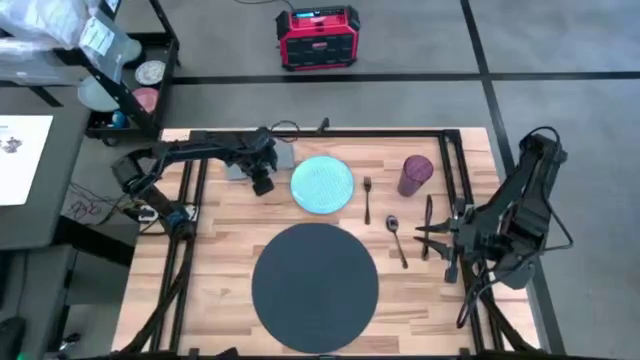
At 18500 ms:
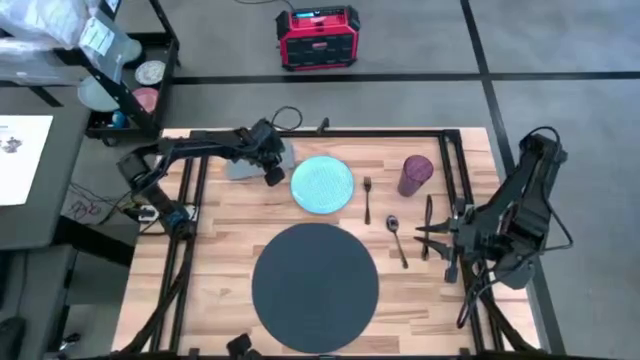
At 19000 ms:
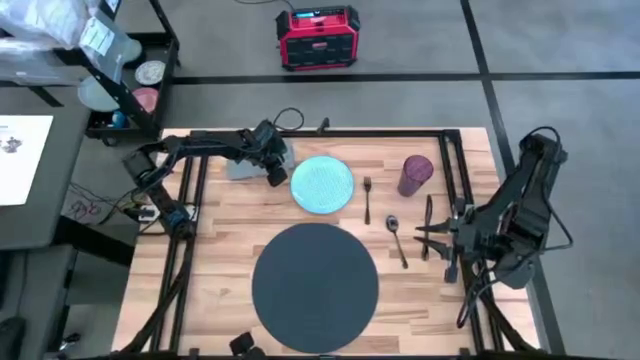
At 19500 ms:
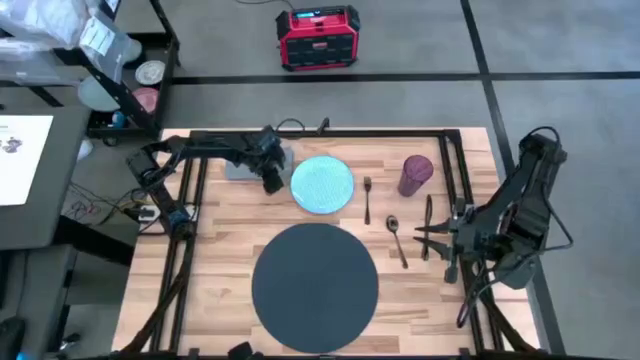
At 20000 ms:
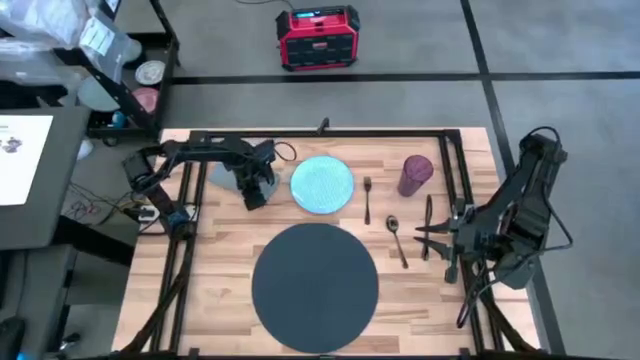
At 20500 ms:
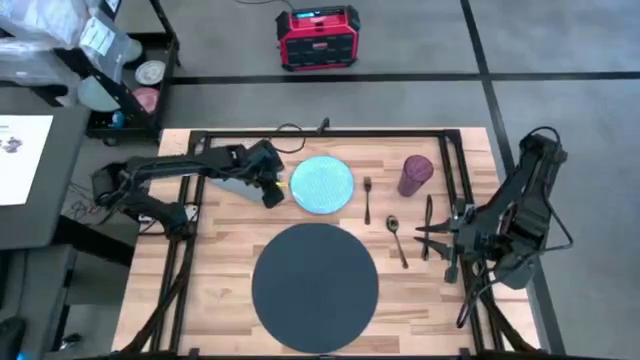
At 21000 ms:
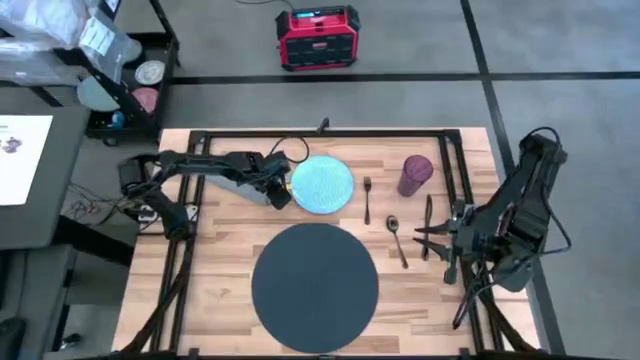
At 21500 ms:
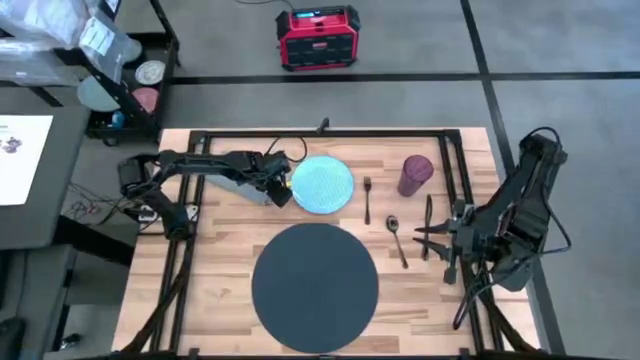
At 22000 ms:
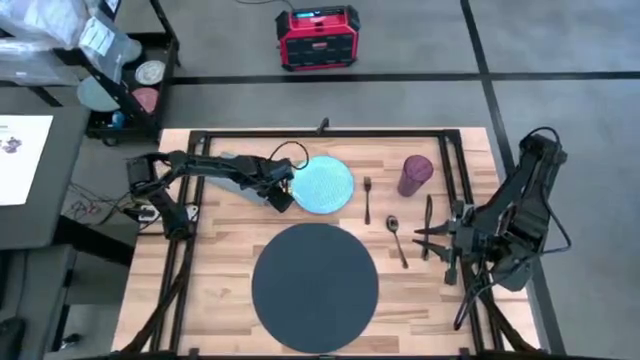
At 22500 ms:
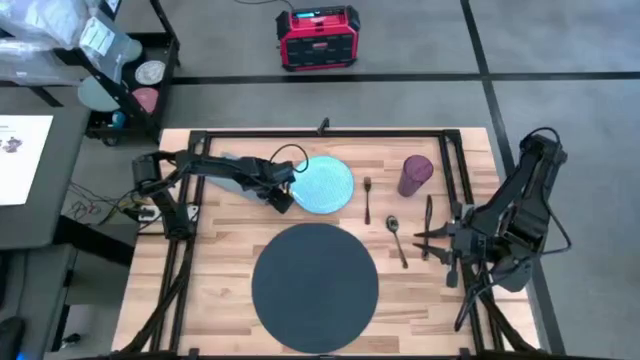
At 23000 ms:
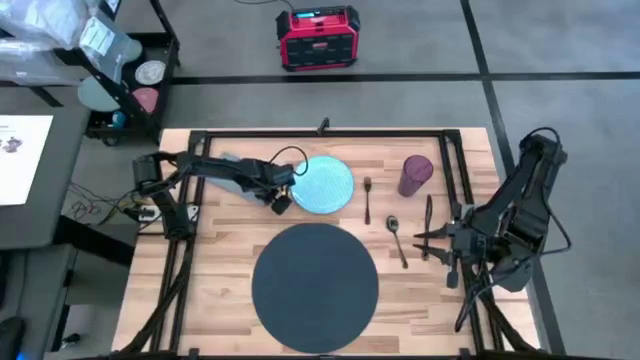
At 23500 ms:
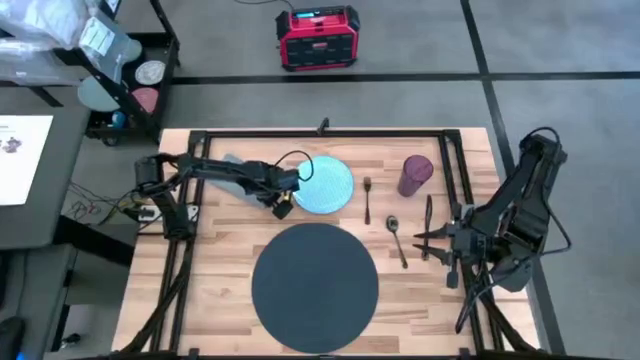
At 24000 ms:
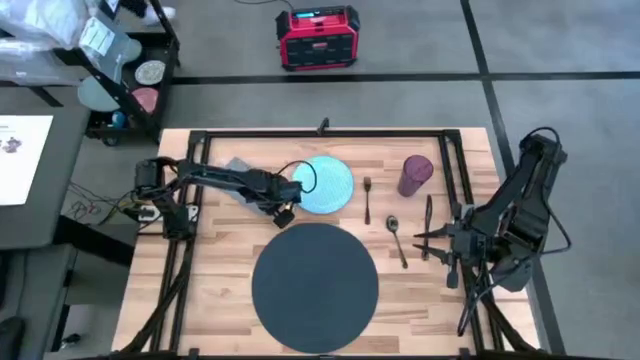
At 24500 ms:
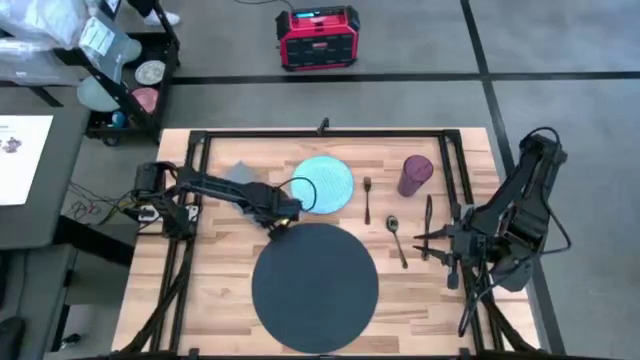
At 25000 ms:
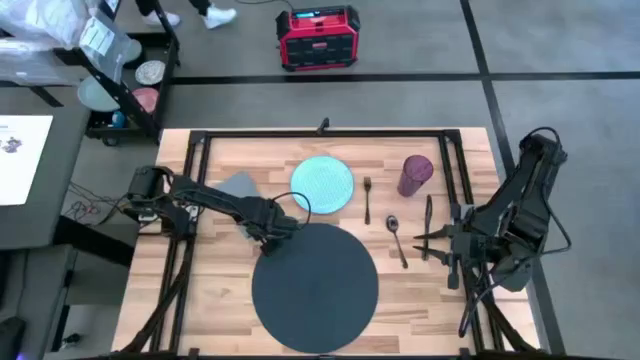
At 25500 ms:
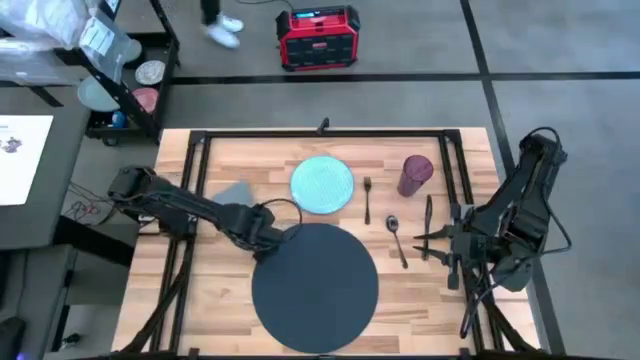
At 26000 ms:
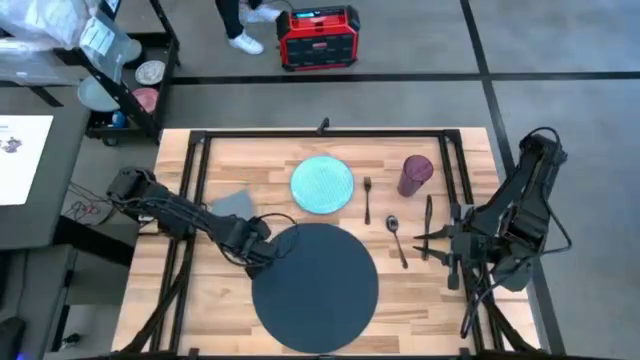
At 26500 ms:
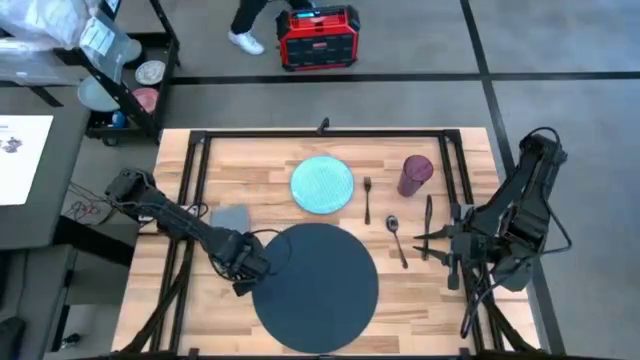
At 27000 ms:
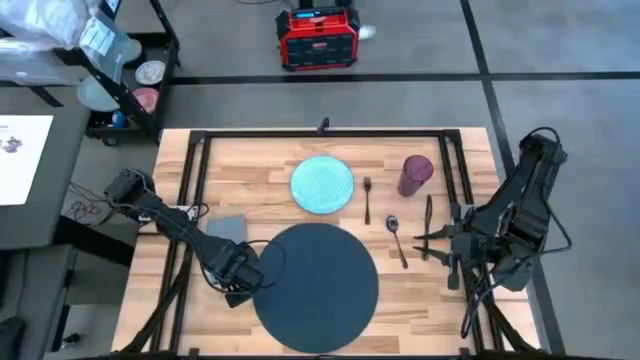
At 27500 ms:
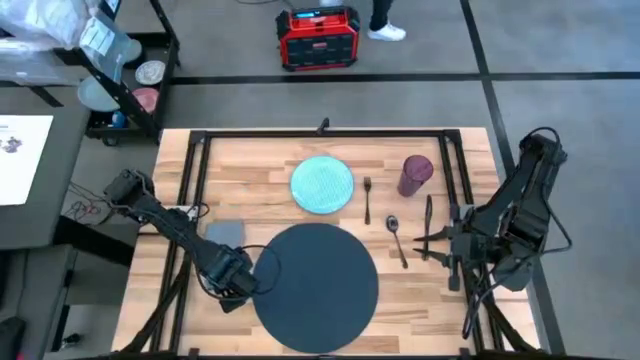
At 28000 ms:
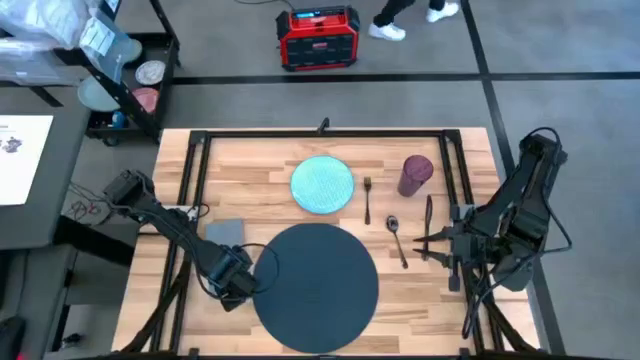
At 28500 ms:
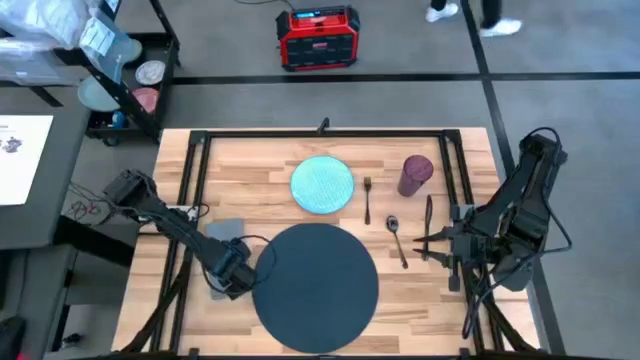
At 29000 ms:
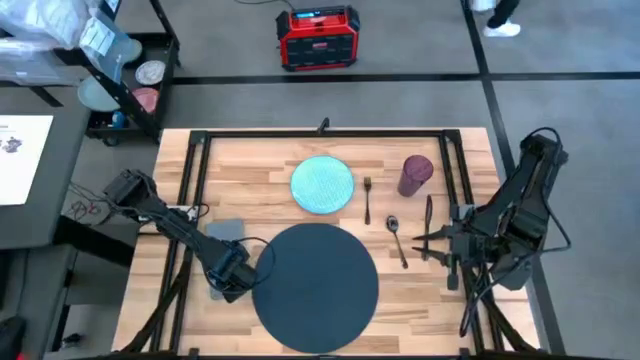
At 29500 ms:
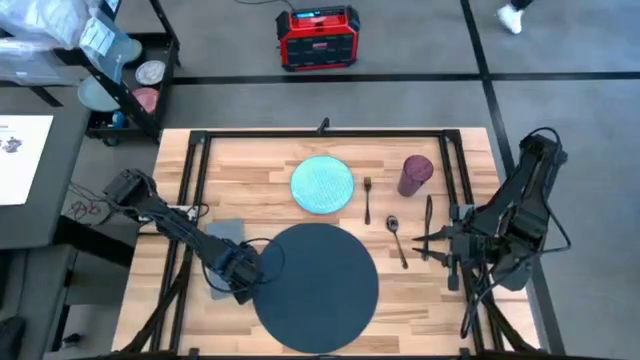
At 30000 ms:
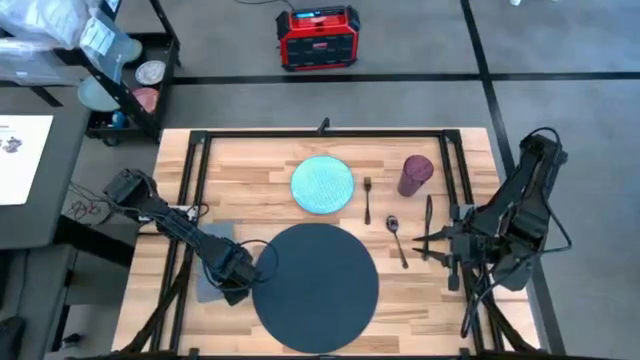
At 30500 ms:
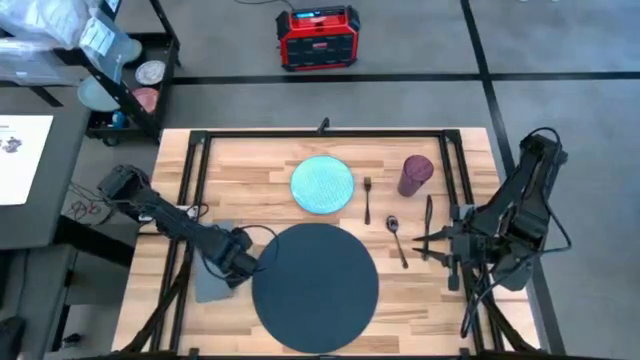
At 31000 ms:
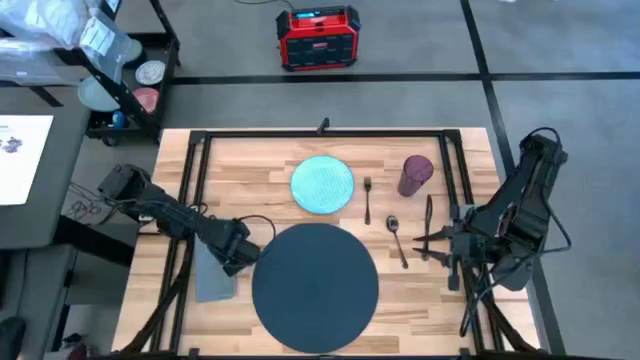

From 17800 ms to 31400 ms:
Task: Set table place
Move the gray table napkin to the left of the black tablemat

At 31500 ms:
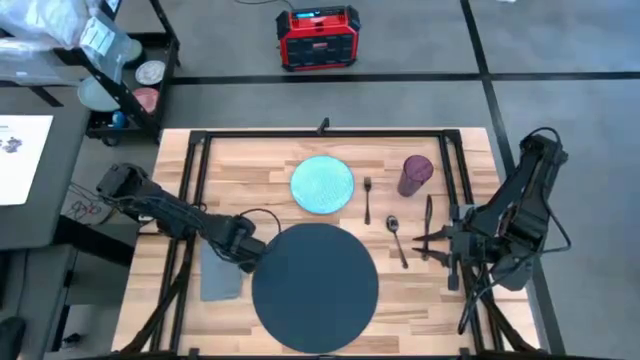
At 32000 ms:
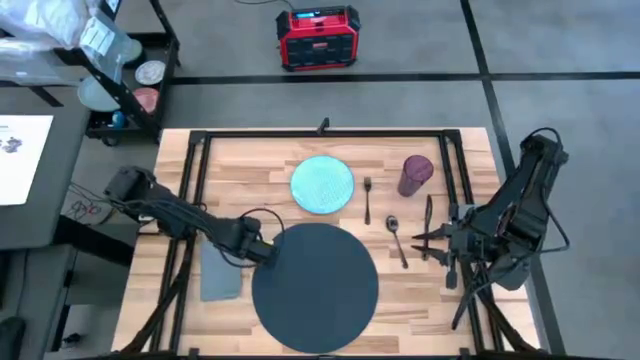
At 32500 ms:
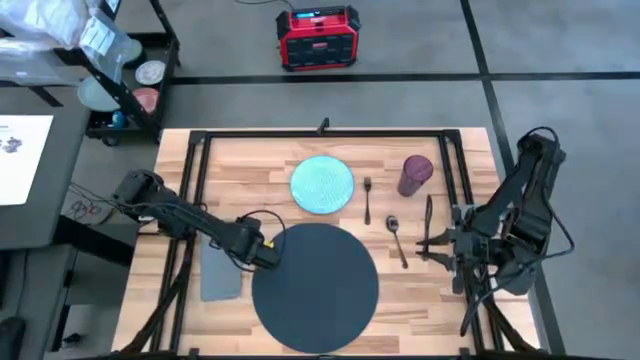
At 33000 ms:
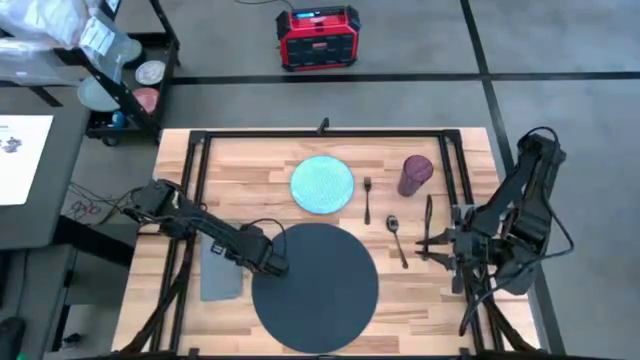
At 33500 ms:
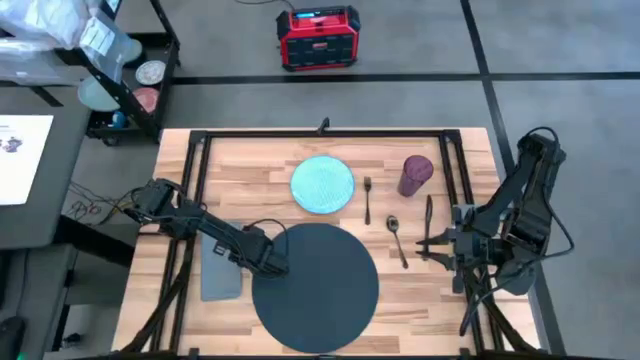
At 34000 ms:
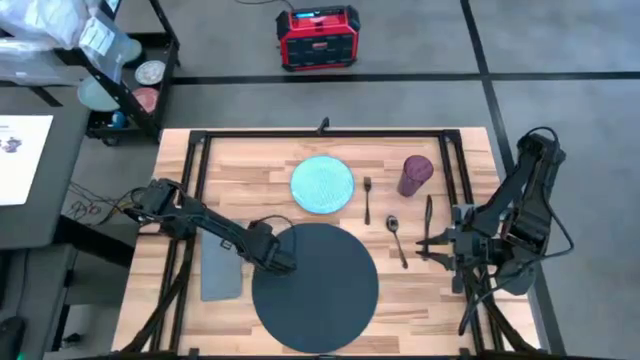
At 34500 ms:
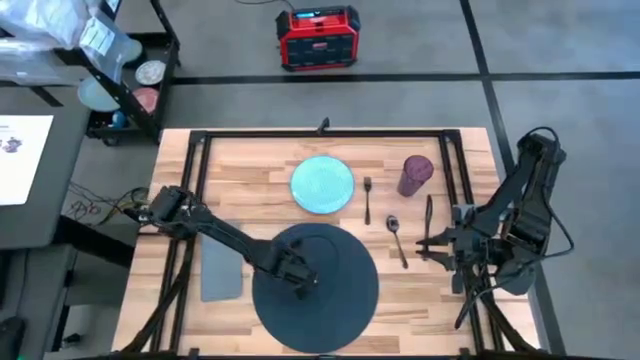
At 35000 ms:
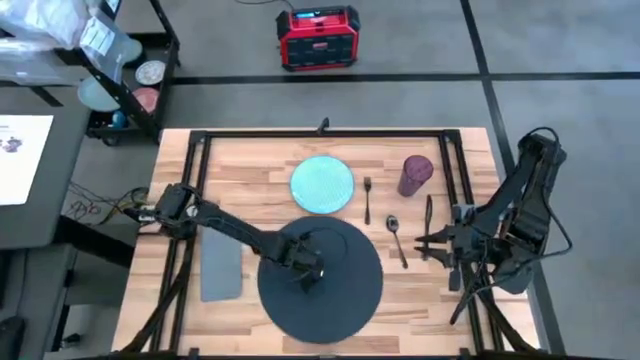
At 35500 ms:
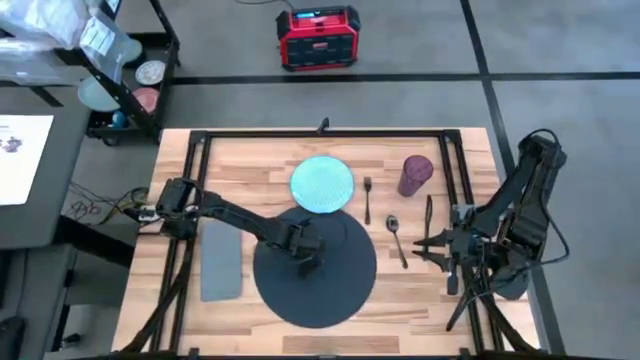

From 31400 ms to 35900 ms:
Adjust the black tablemat

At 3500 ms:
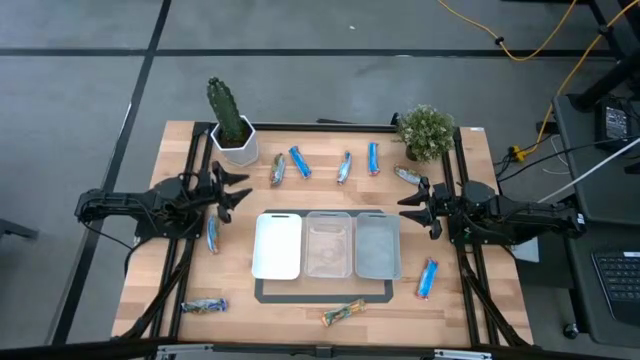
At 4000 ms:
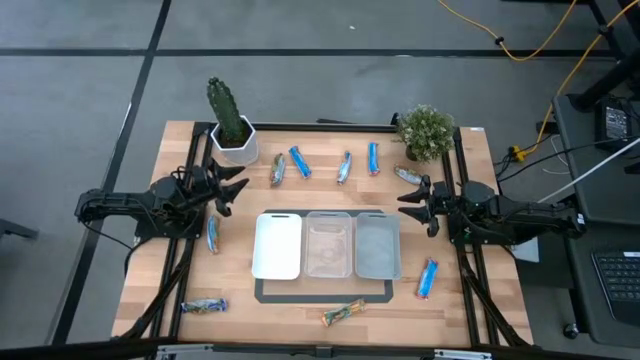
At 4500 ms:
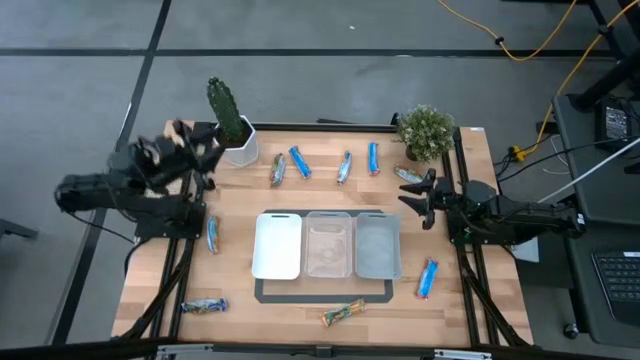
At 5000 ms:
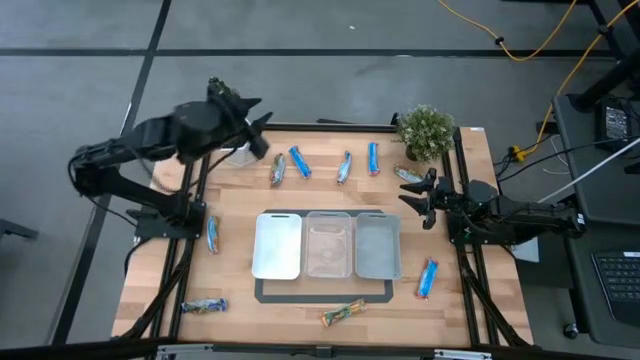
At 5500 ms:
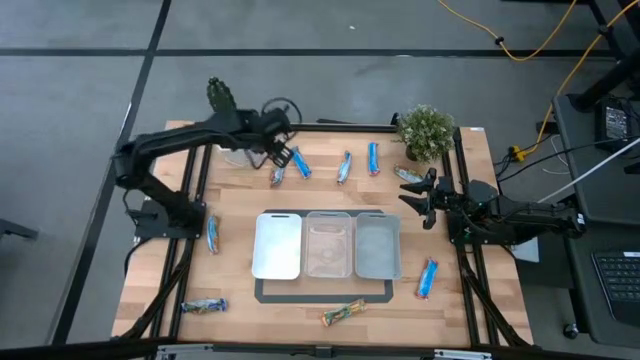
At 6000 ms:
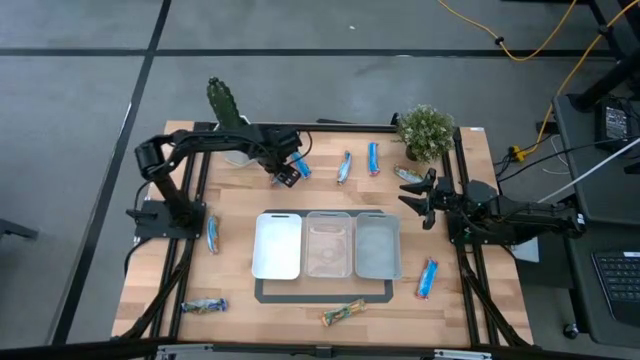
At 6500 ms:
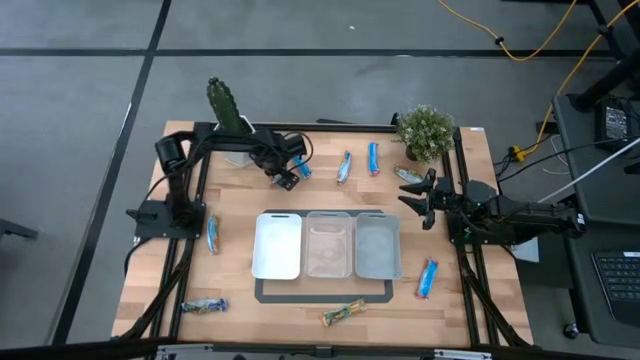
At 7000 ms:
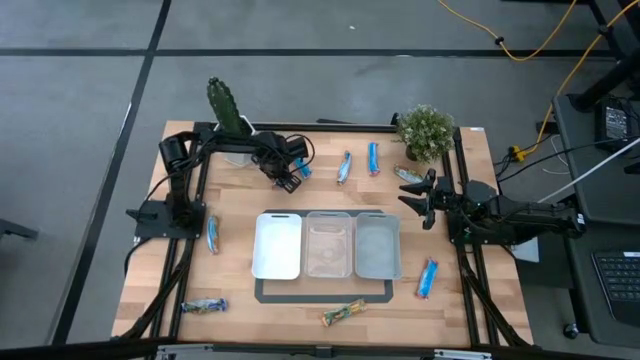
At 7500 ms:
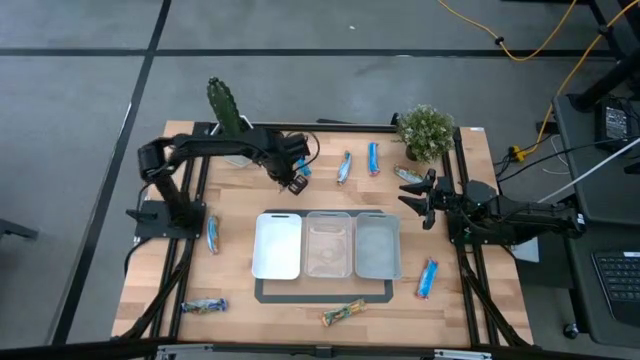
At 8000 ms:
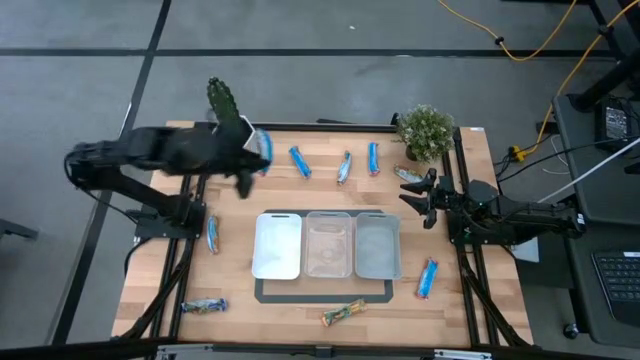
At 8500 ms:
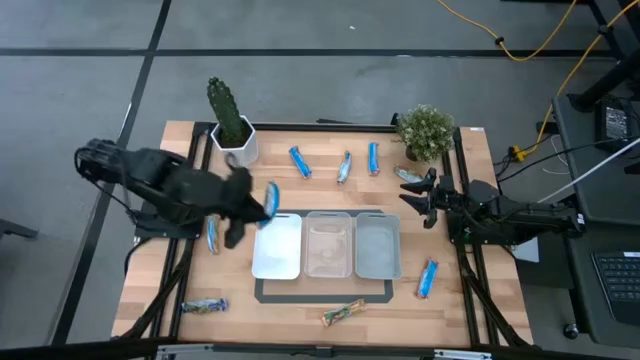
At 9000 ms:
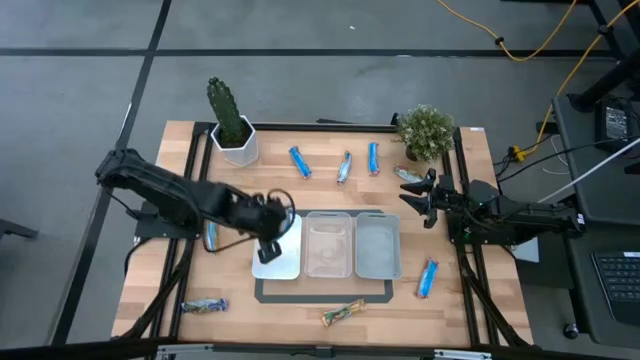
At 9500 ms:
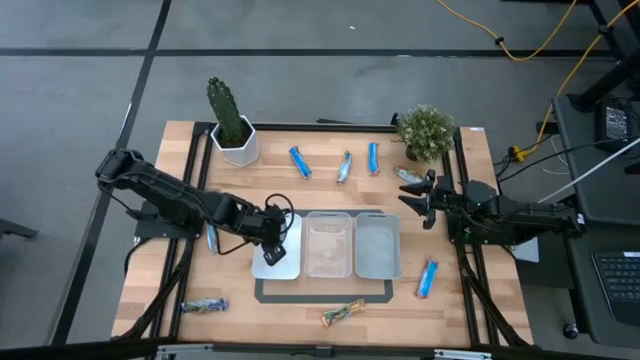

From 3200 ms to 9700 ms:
Task: Pick and place Granola Bars by type
Put the red granola bar into the white bin
